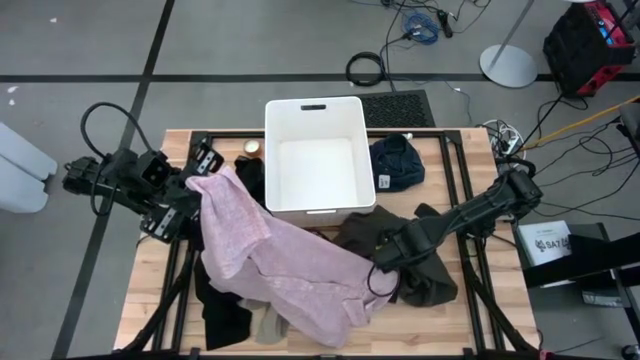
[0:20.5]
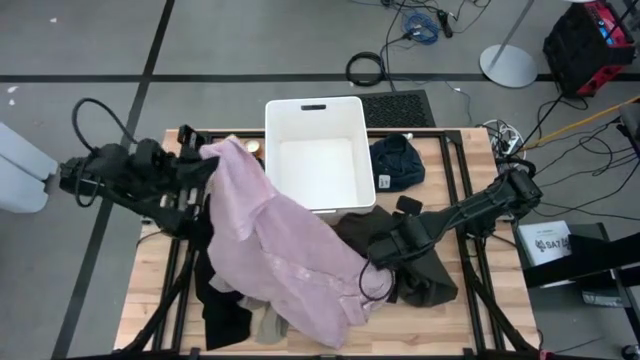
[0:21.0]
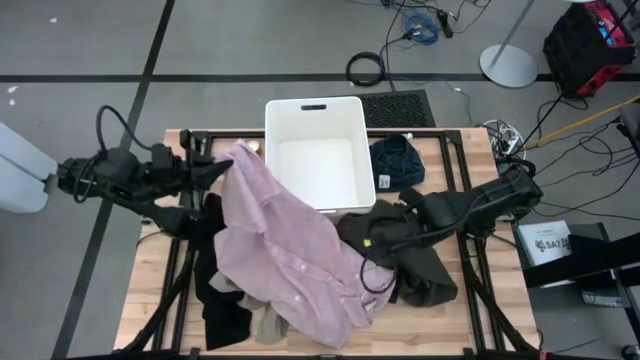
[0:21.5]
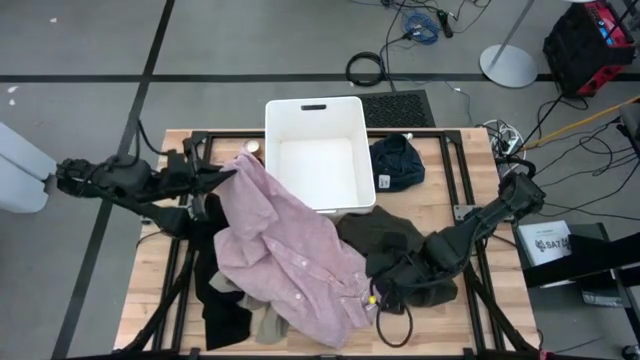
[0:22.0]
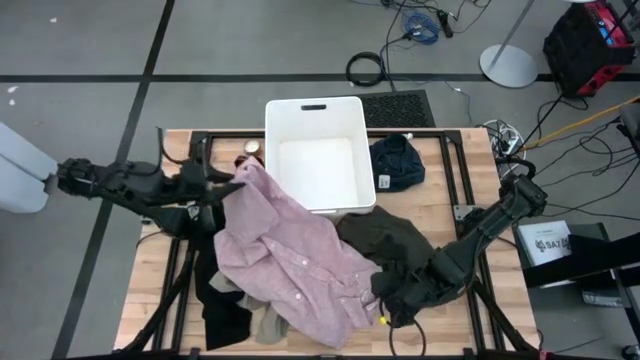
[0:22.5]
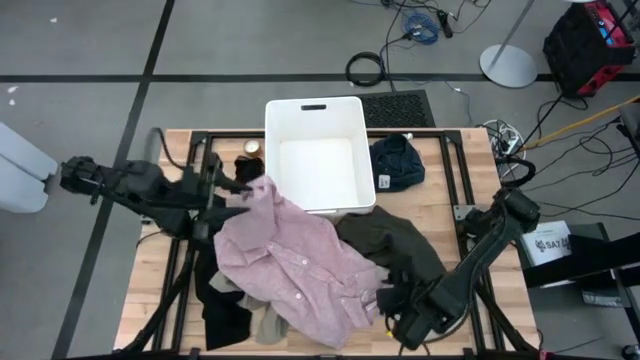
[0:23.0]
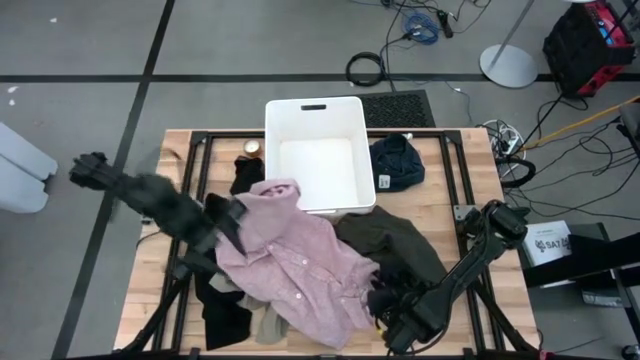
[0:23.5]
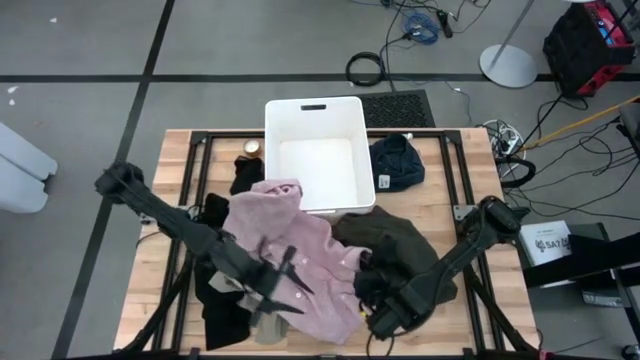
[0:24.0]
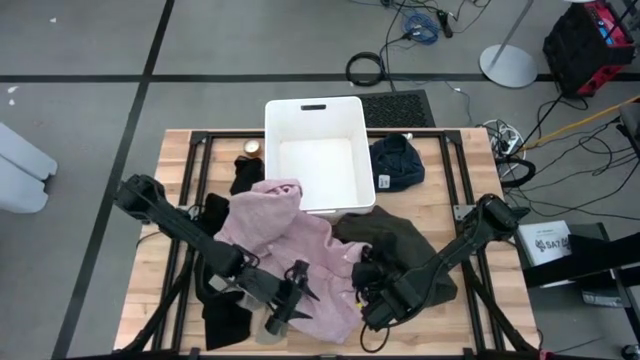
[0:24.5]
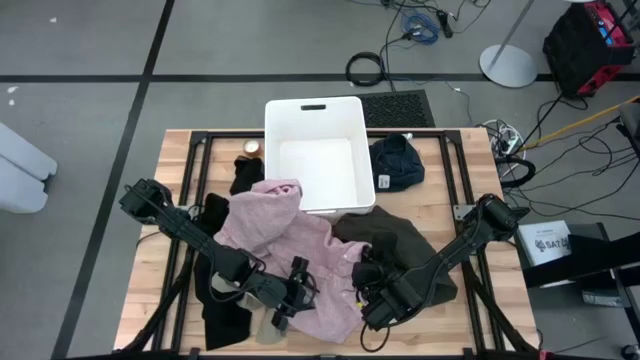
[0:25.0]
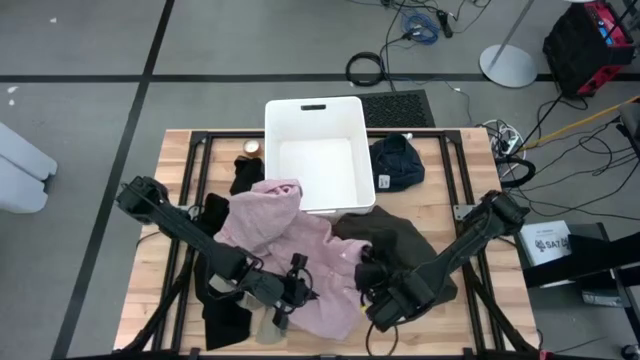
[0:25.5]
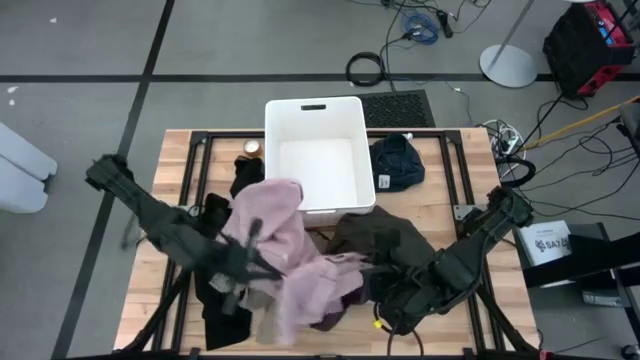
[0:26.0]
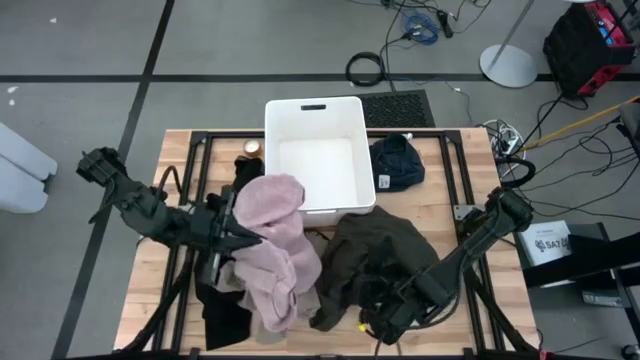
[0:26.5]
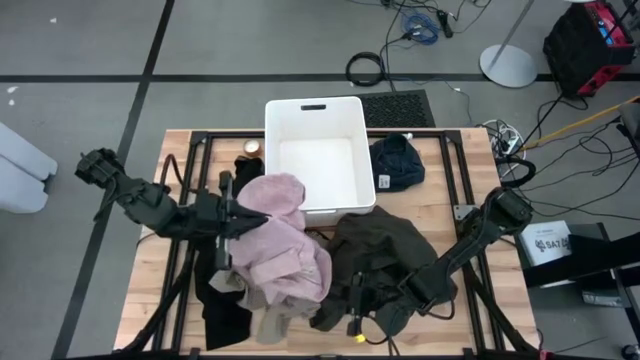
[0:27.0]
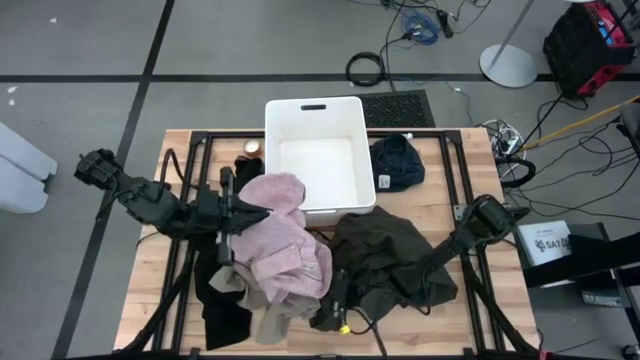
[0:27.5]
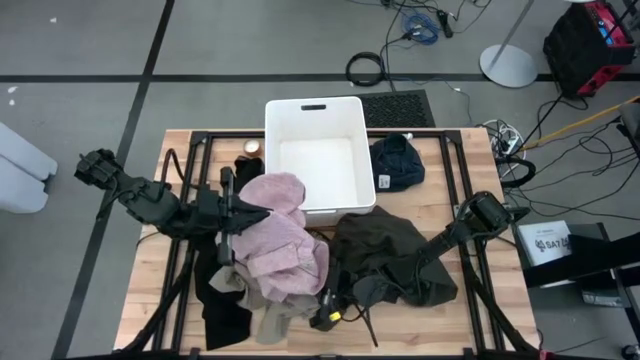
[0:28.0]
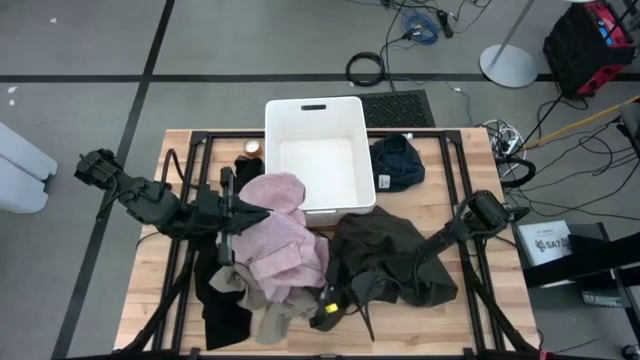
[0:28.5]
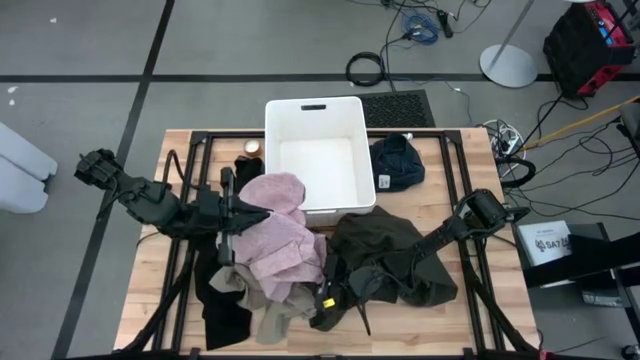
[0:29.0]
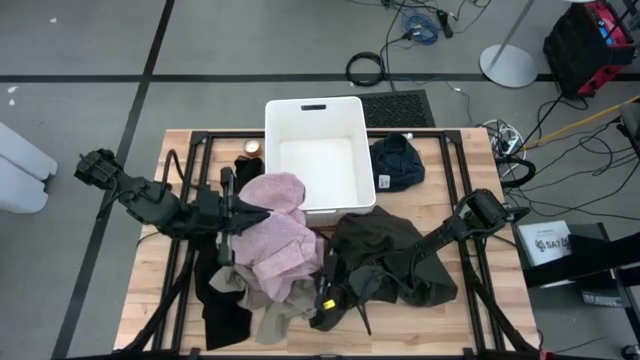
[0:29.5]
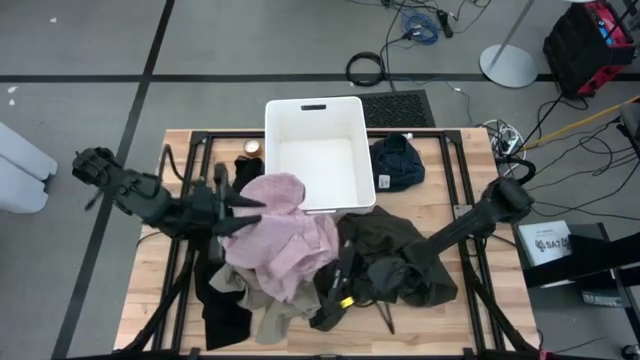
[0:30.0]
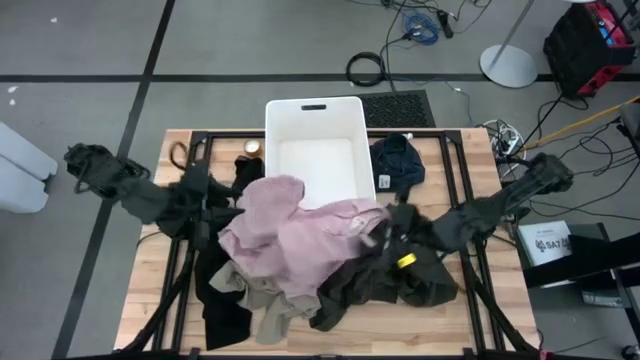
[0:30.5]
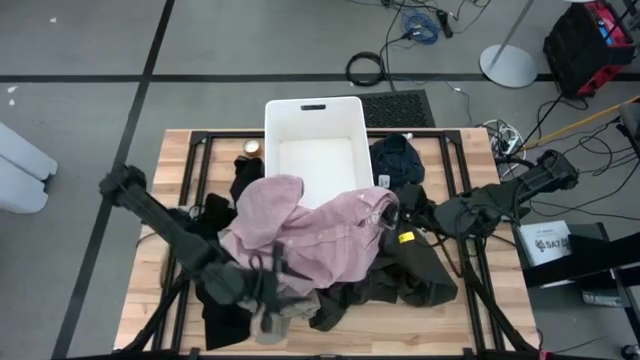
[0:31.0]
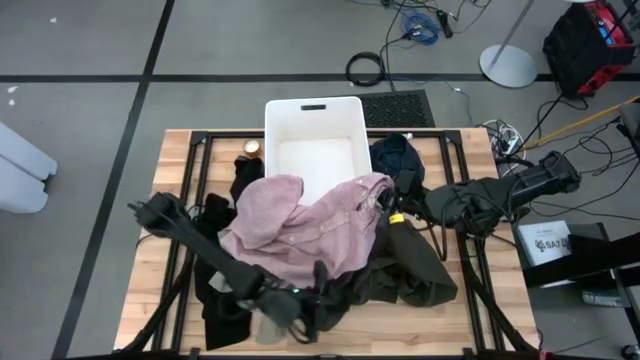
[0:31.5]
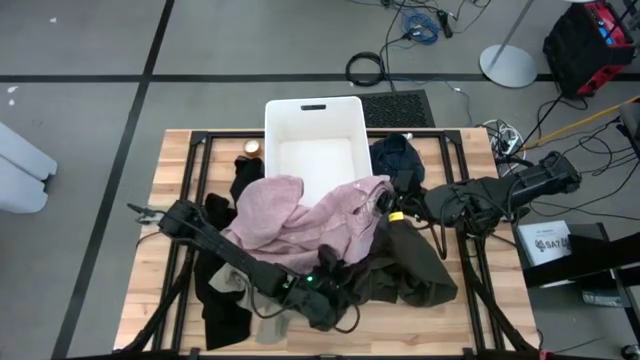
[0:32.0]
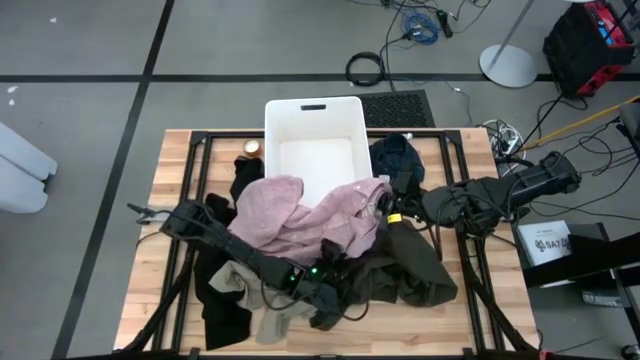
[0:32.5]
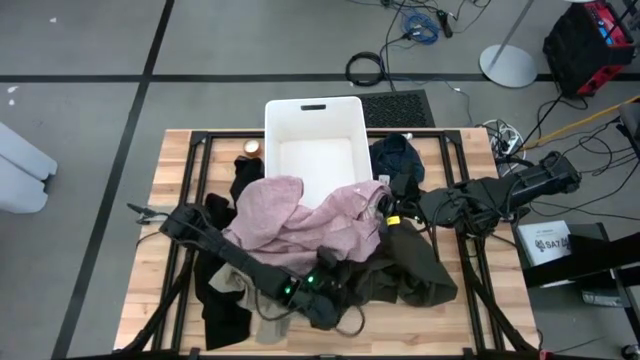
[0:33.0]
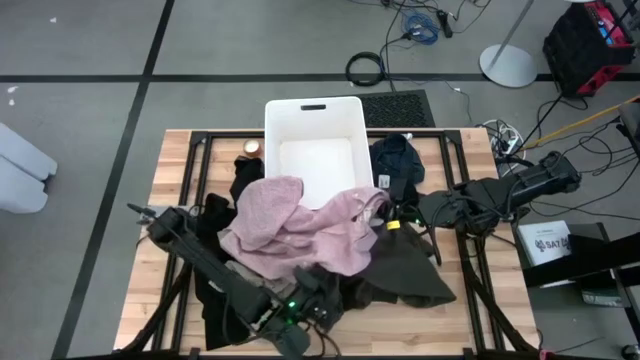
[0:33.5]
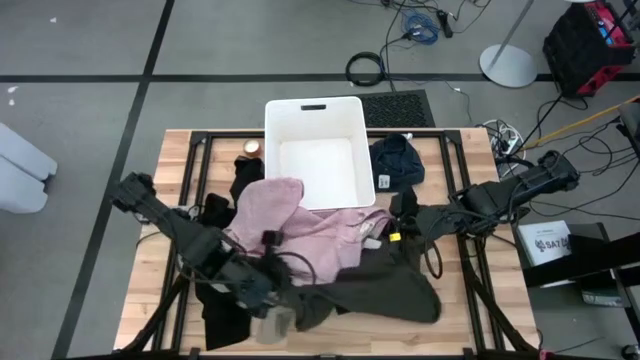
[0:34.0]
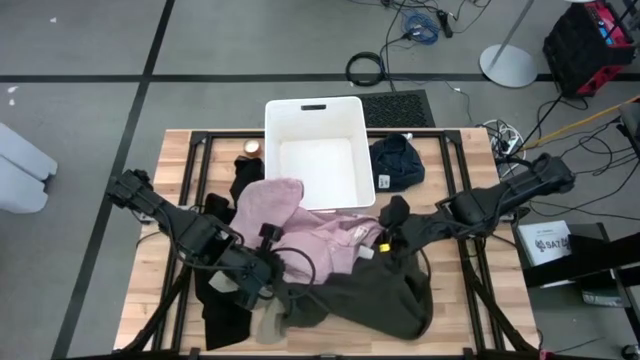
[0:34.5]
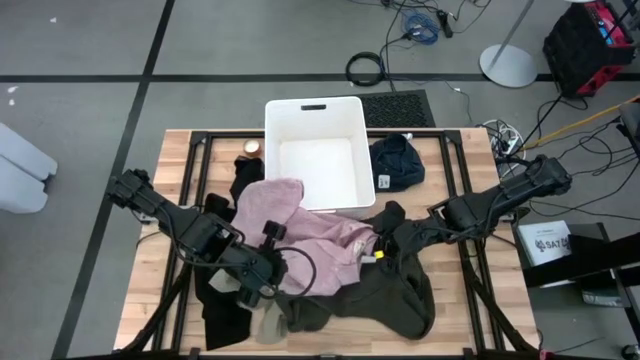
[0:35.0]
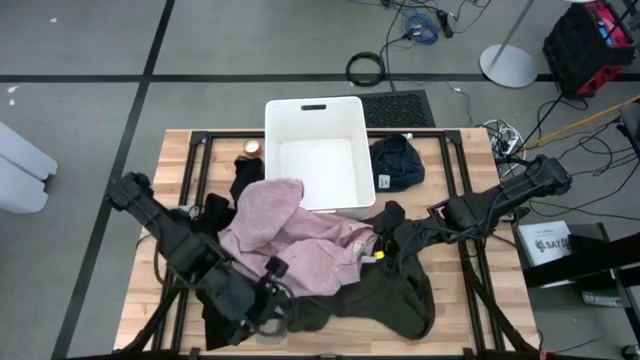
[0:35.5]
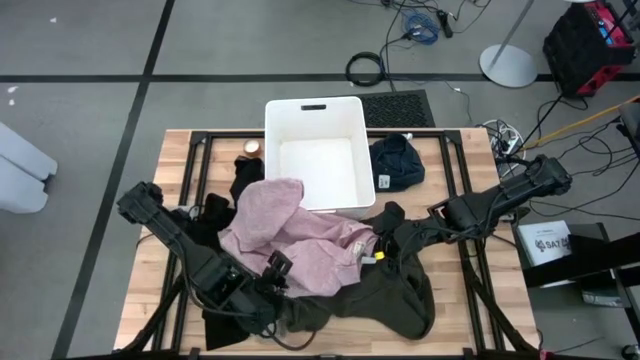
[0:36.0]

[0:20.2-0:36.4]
Task: Fold laundry
Put the pink polo into the white laundry bin

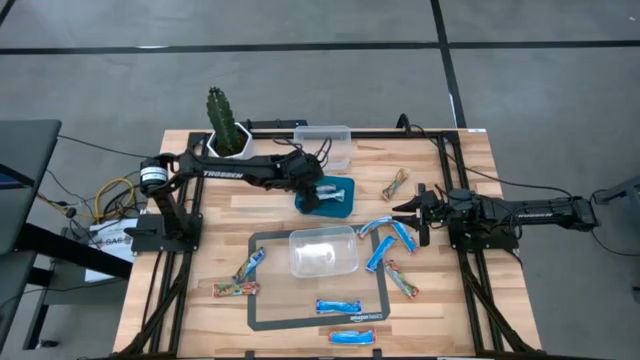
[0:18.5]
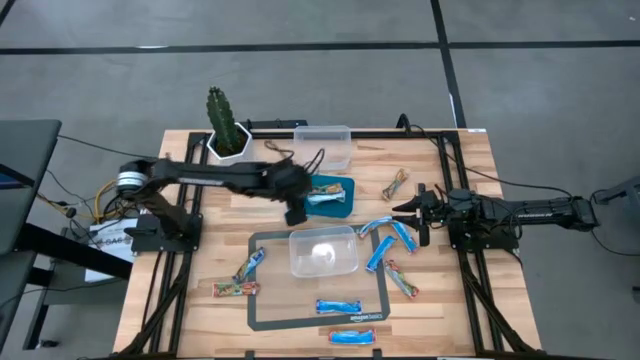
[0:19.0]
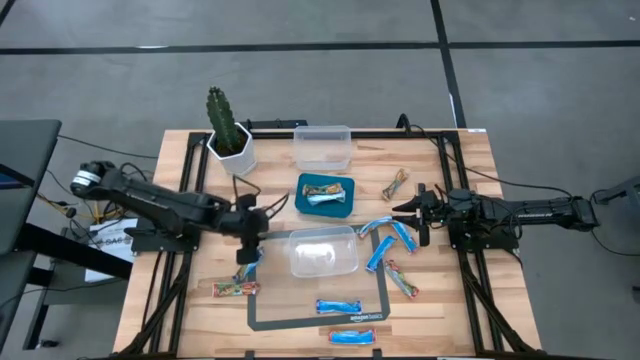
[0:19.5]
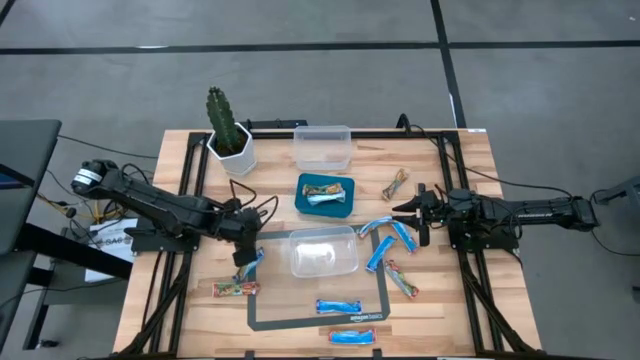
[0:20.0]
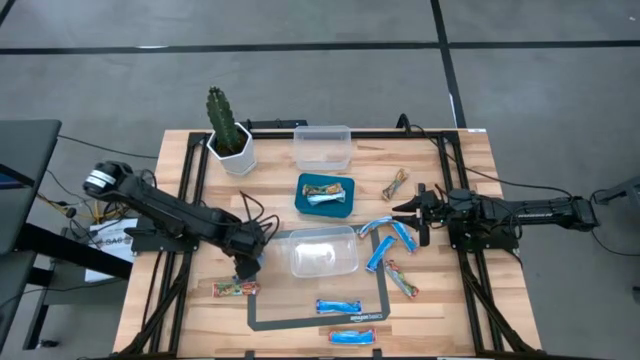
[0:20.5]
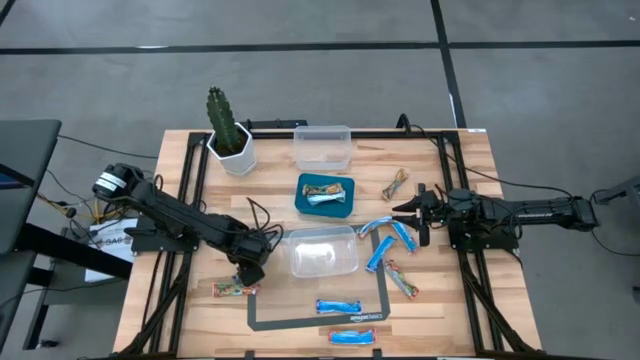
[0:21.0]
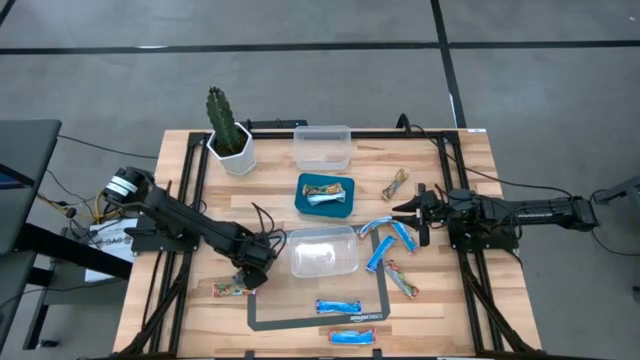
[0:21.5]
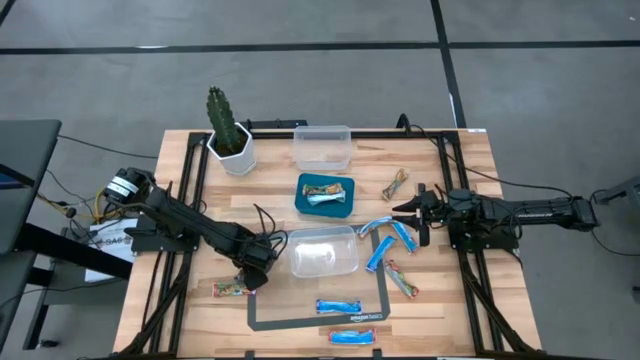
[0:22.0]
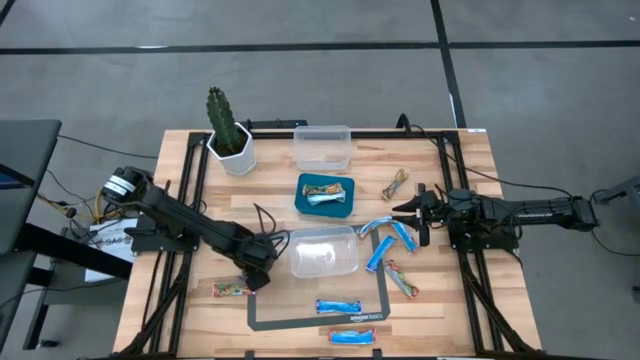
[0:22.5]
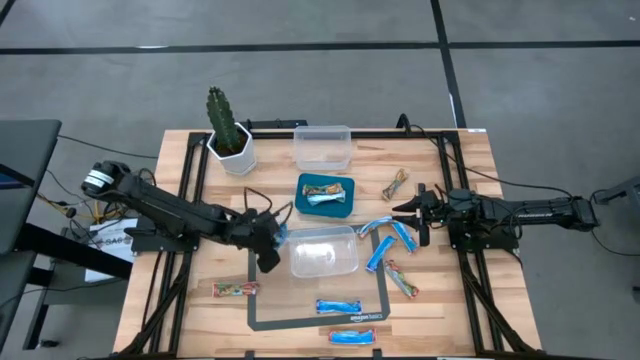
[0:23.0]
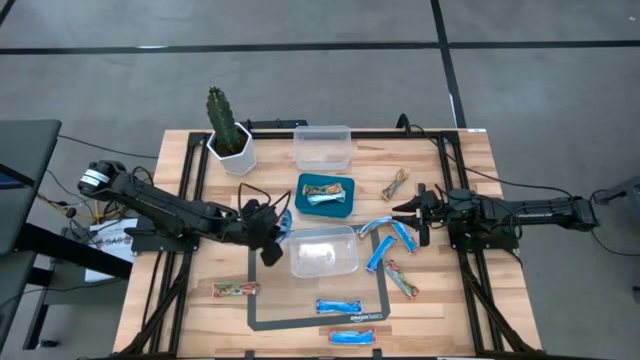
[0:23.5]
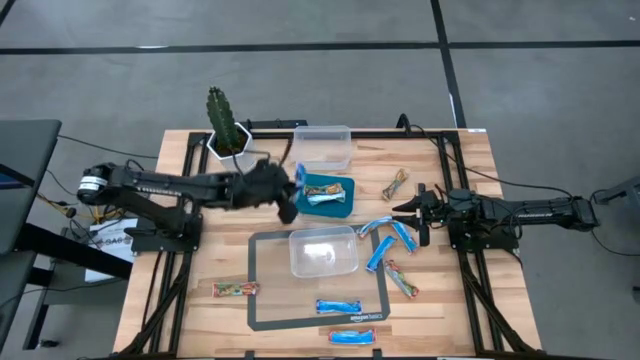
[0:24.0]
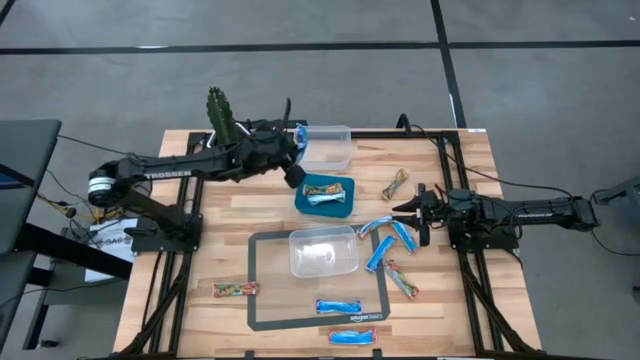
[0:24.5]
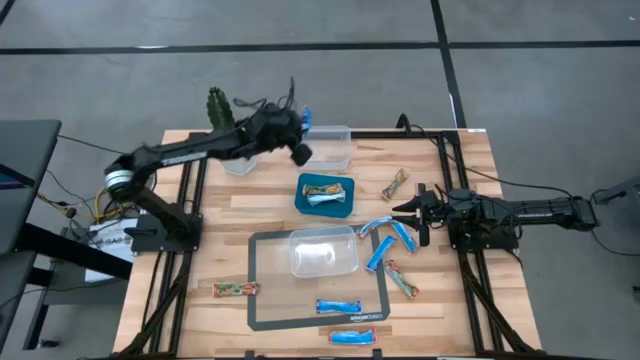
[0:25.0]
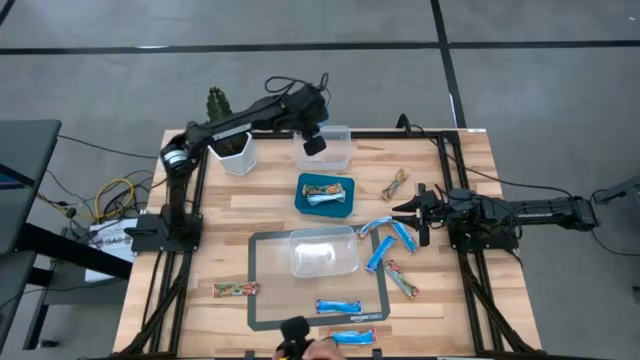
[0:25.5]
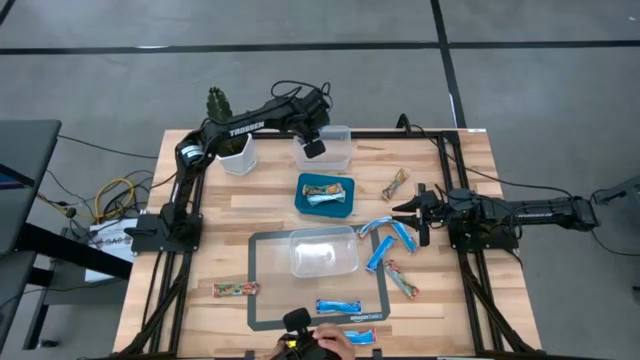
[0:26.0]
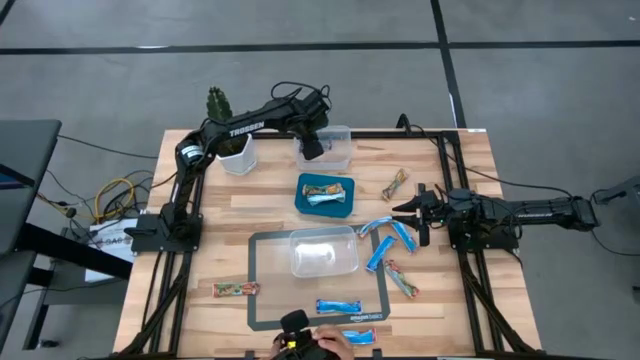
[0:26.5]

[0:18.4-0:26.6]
Task: Pick and place Granola Bars by type
Put the blue granola bar into the top transparent bin
